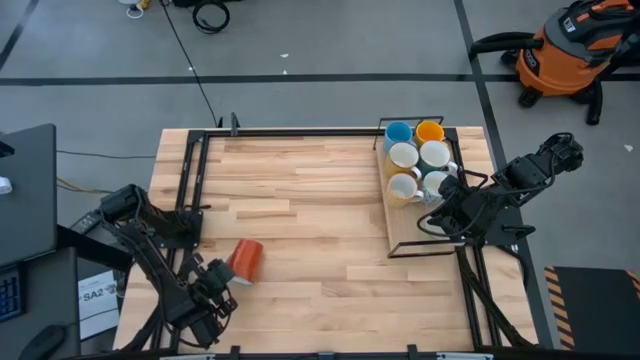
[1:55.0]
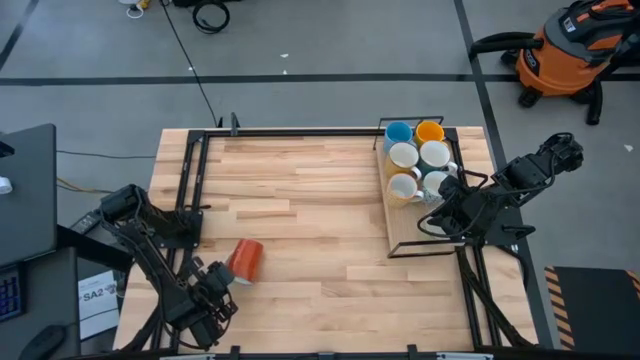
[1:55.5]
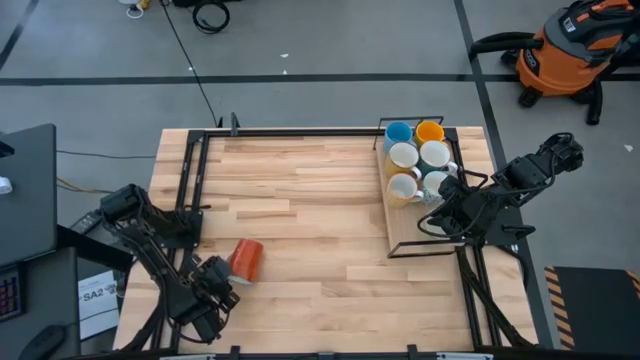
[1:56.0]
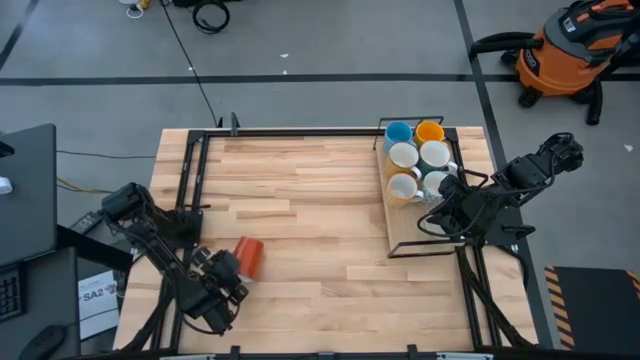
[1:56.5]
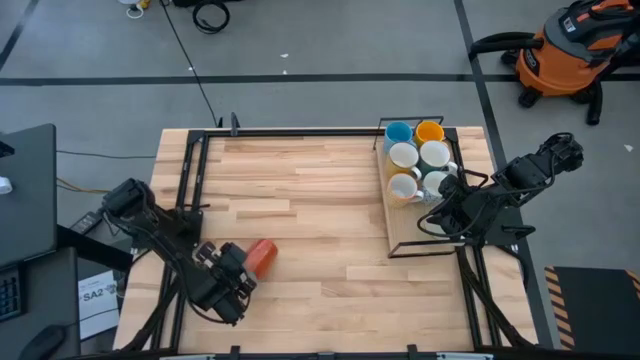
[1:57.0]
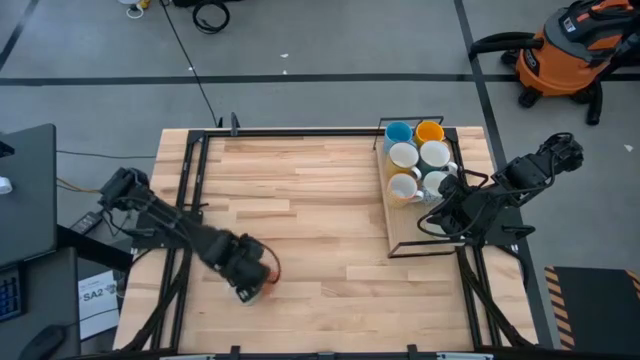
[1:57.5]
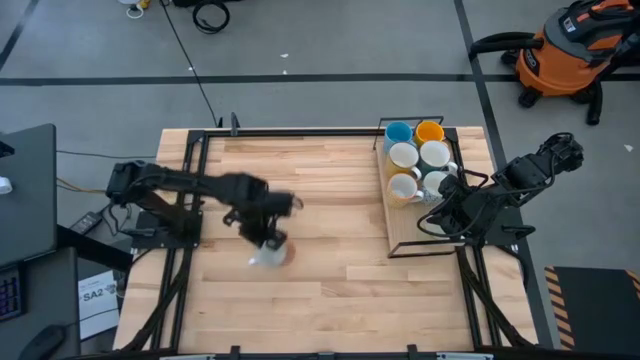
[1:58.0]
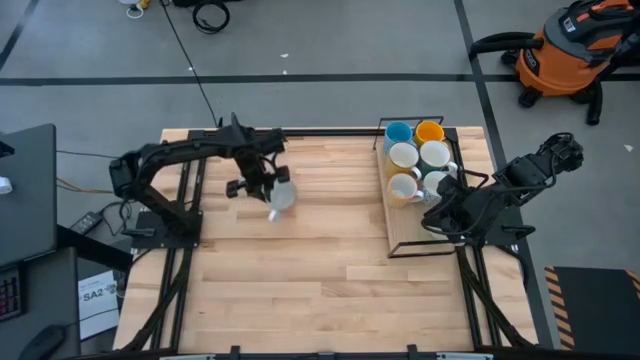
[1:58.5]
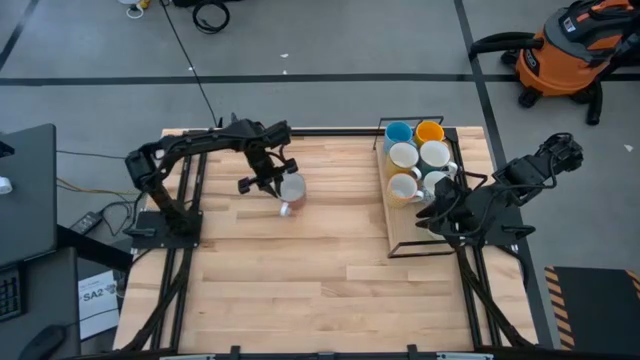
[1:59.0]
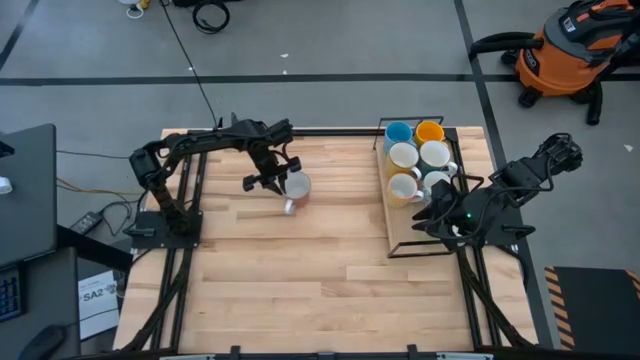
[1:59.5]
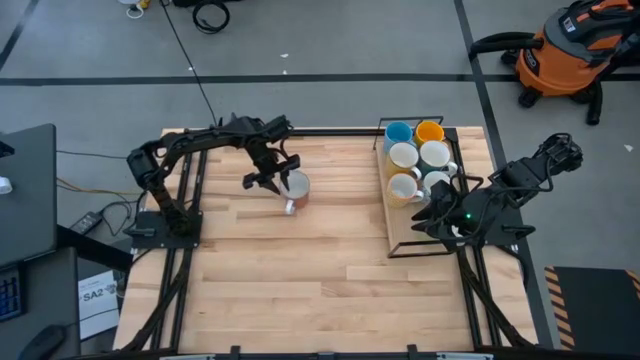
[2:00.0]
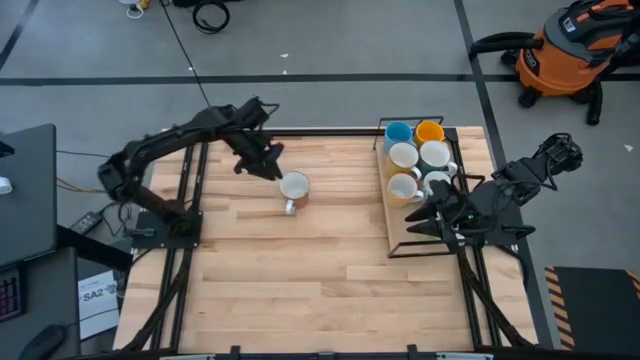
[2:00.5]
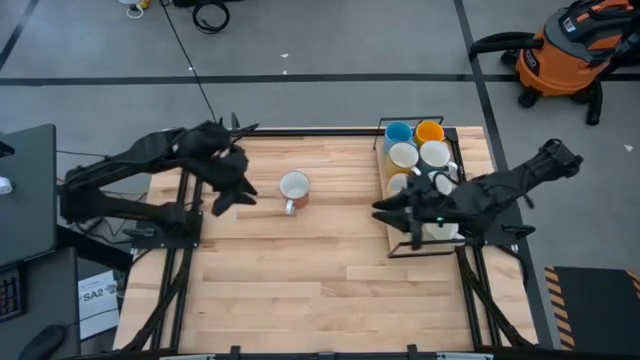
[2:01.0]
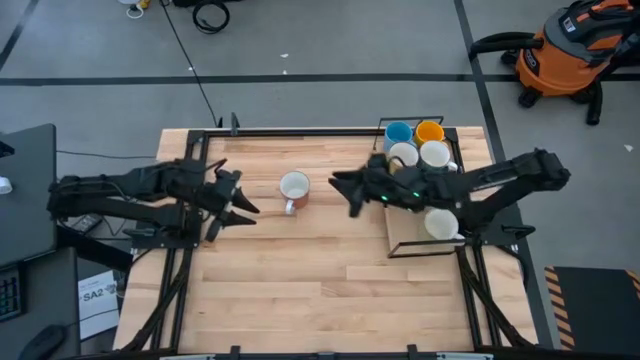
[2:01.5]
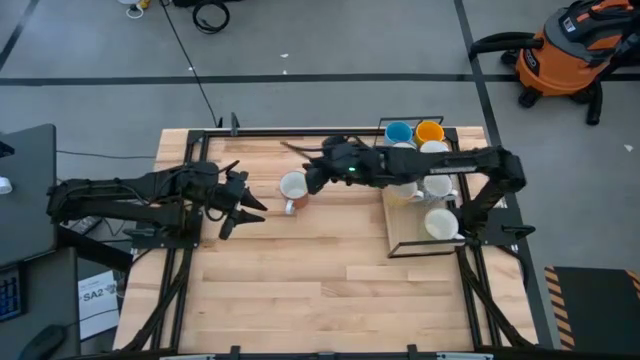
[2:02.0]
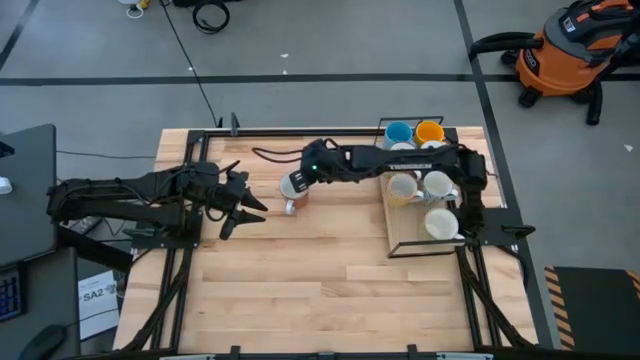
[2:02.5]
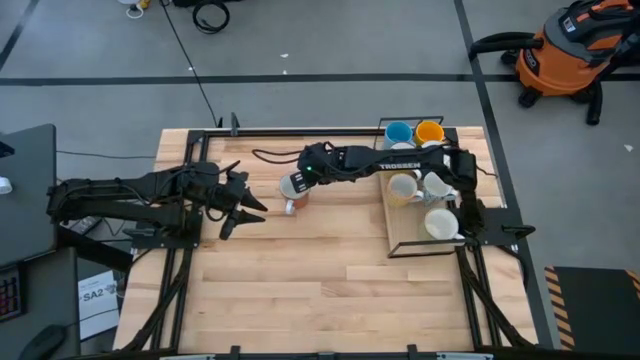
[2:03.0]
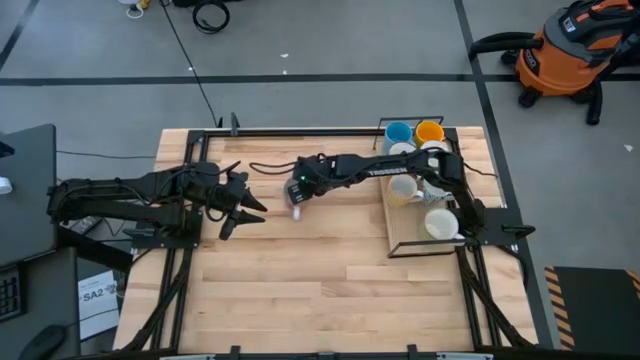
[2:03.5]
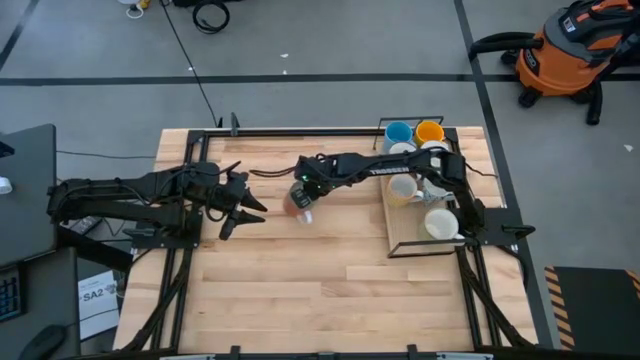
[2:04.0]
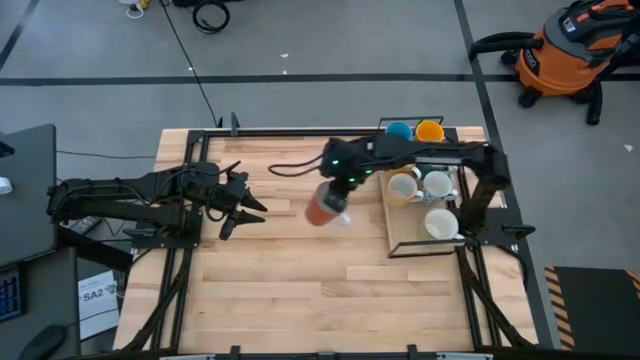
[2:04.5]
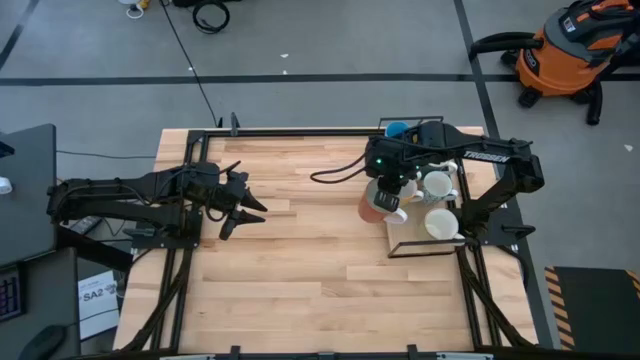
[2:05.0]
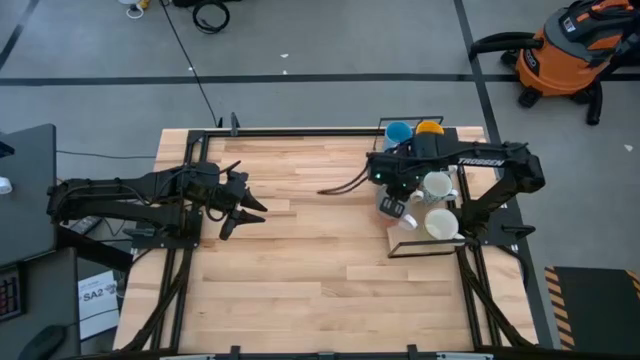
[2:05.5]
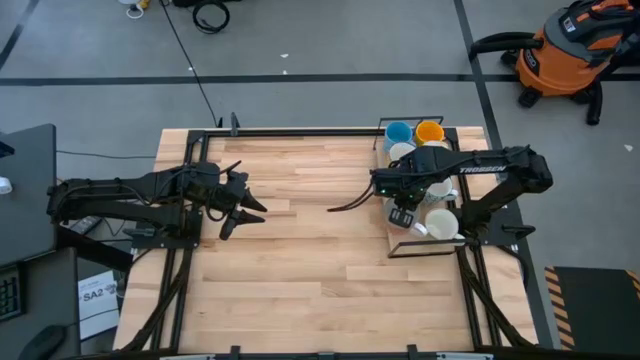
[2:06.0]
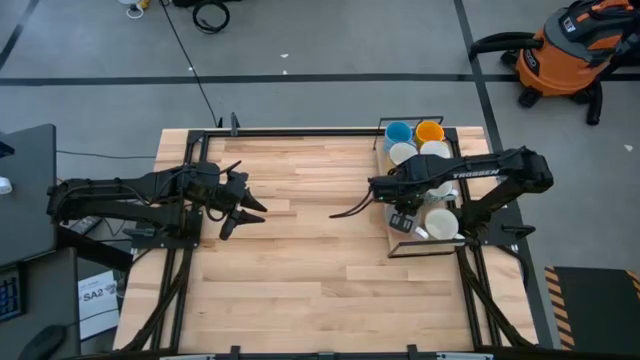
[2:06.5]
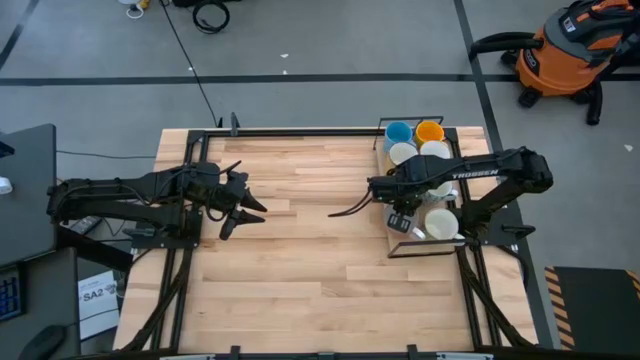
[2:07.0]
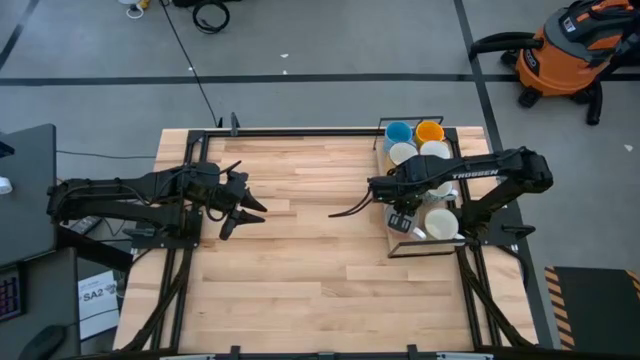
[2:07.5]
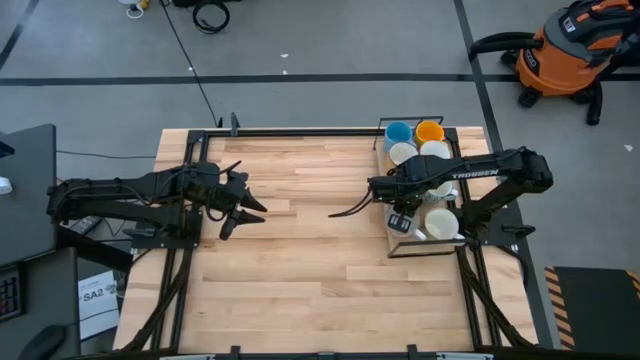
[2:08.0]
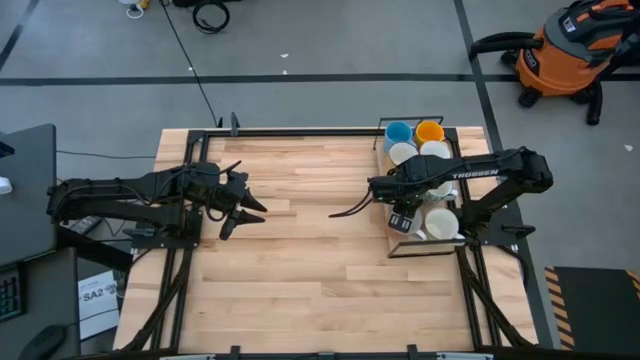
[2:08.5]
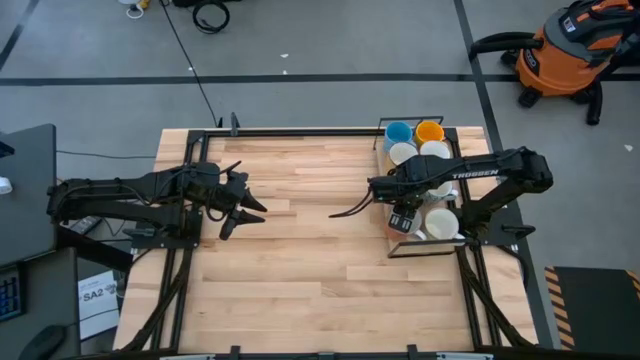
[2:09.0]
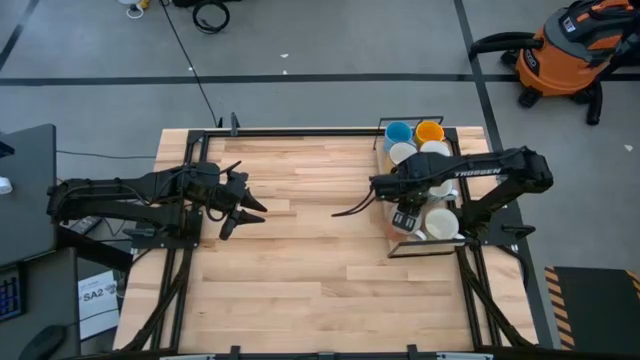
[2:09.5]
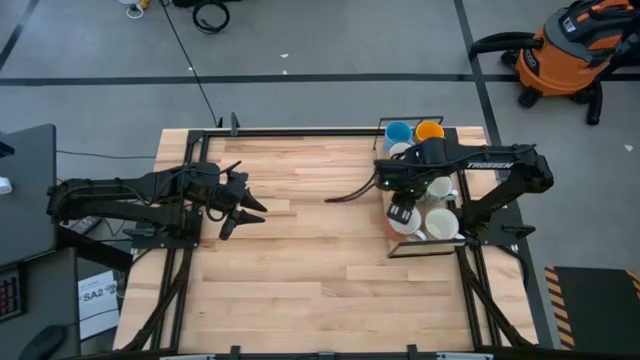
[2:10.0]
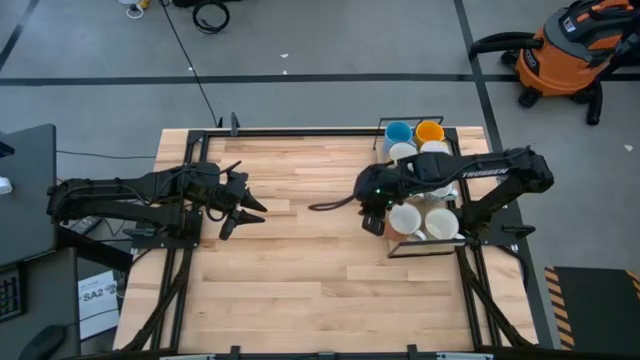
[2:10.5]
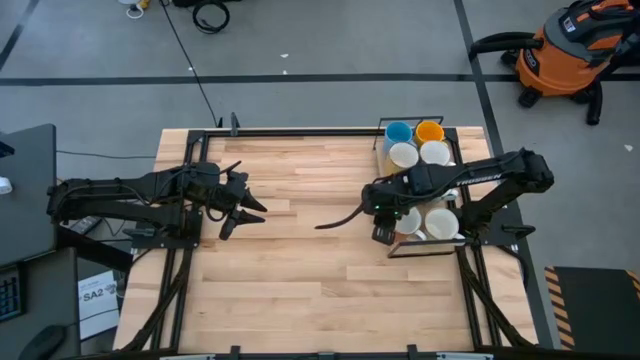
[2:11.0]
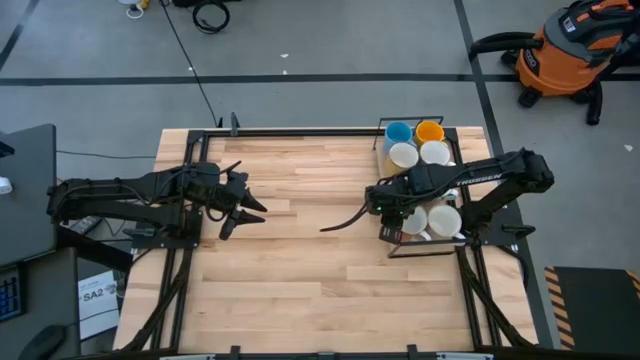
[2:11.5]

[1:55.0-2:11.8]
Task: Place coffee mugs
Put the brown mug on the shelf

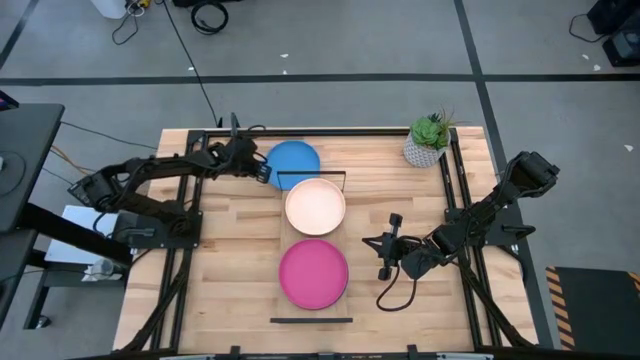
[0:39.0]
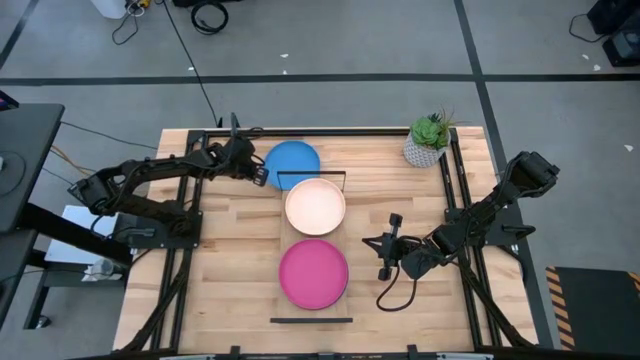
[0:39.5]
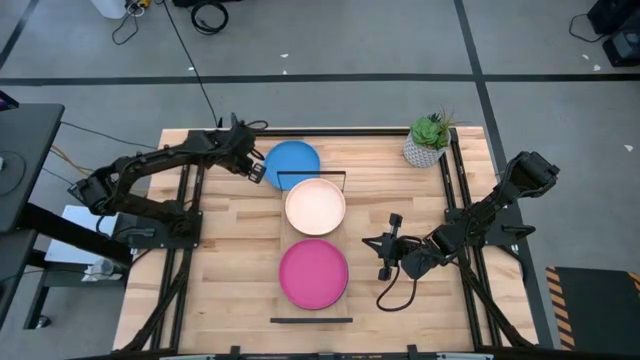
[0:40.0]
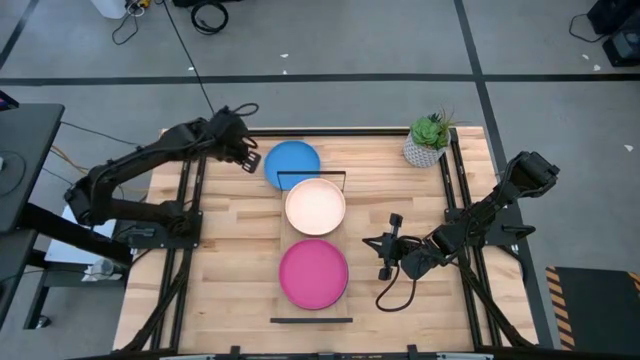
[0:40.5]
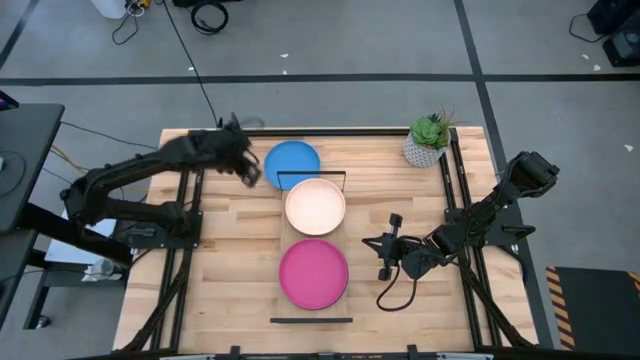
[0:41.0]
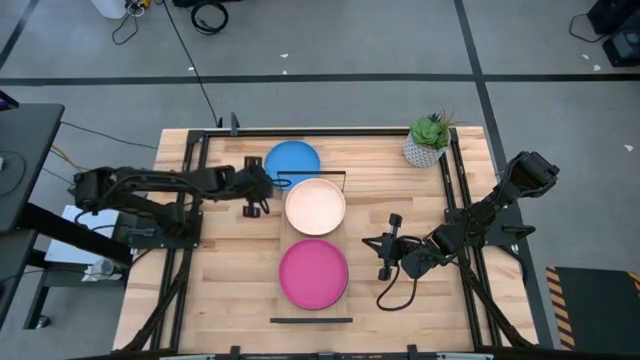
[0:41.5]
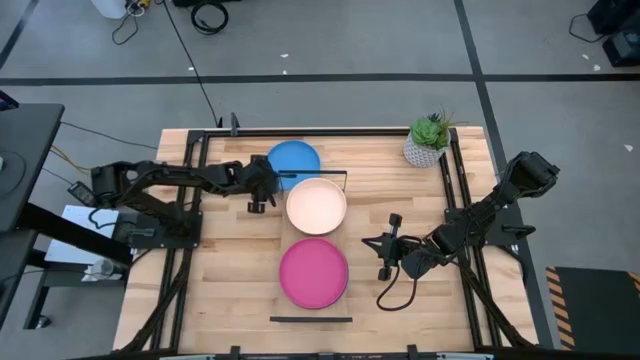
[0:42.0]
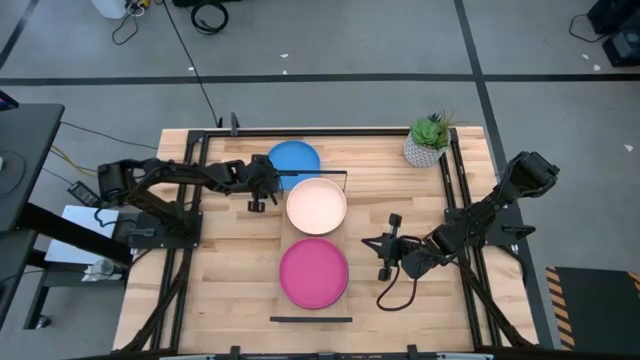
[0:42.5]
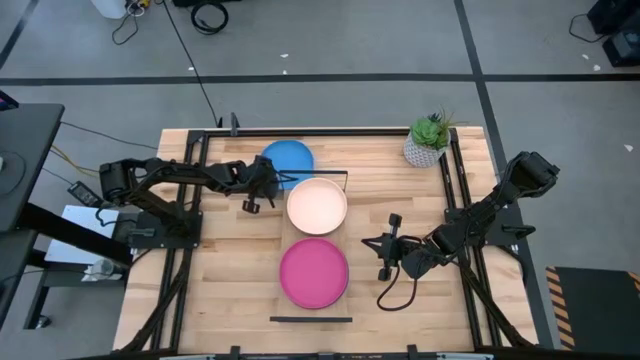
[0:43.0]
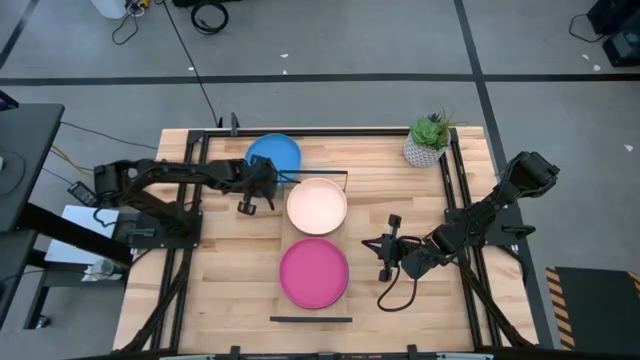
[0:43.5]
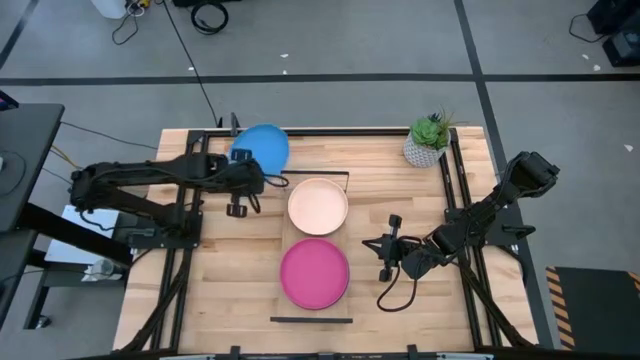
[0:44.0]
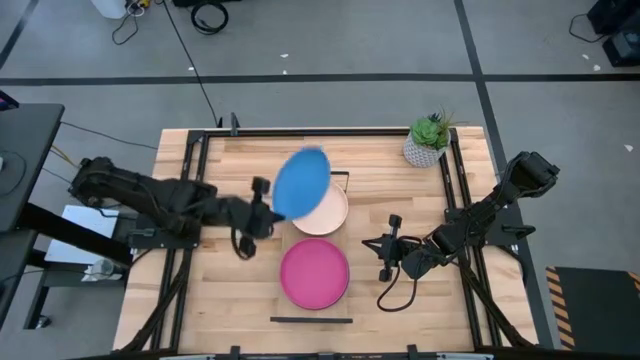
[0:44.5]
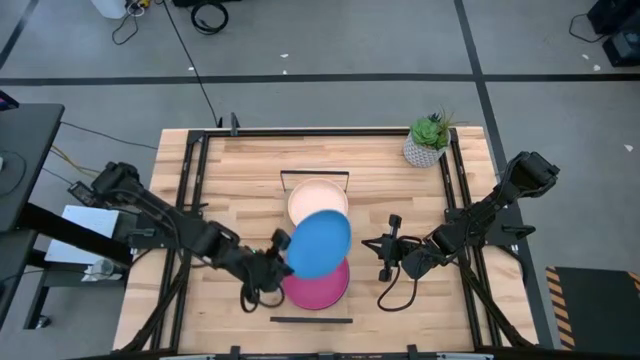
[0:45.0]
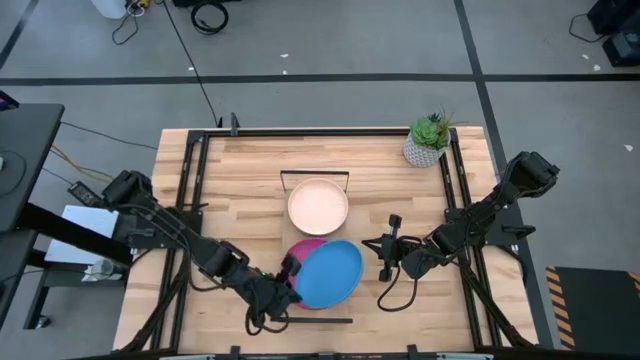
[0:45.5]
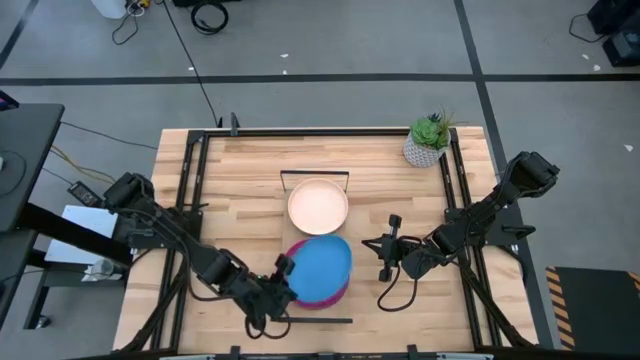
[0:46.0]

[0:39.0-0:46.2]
Task: Place and stack plates onto a shelf
Stack the blue plate on top of the pink plate on the shelf
